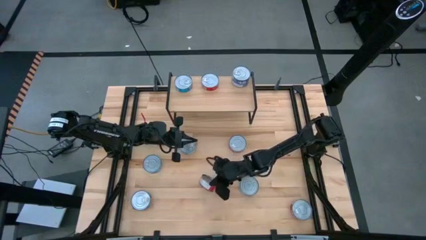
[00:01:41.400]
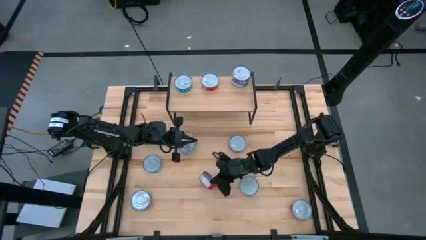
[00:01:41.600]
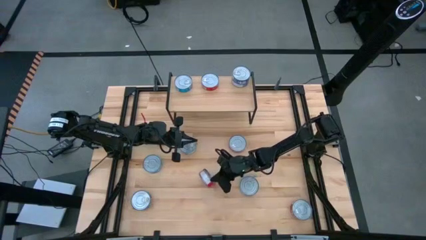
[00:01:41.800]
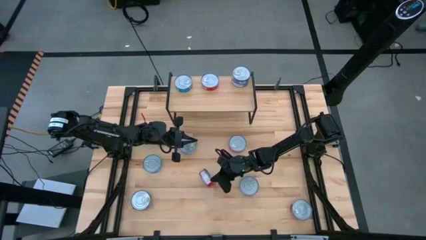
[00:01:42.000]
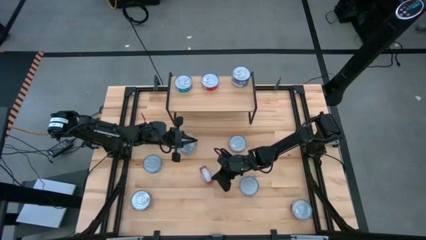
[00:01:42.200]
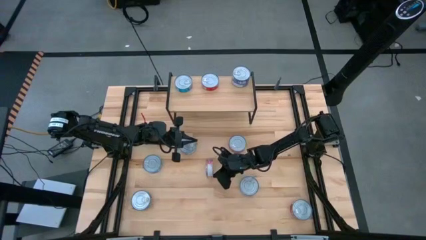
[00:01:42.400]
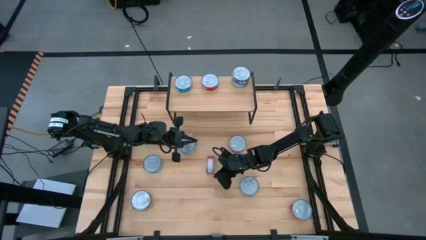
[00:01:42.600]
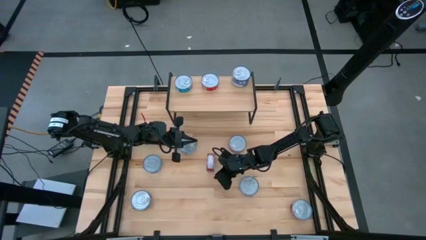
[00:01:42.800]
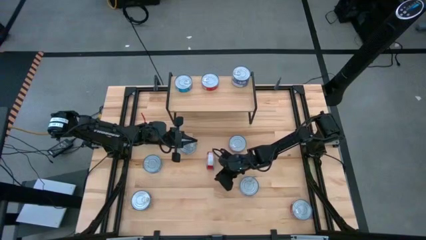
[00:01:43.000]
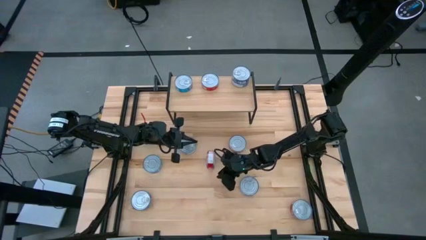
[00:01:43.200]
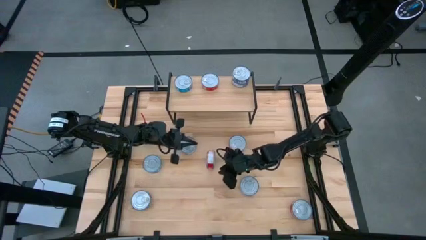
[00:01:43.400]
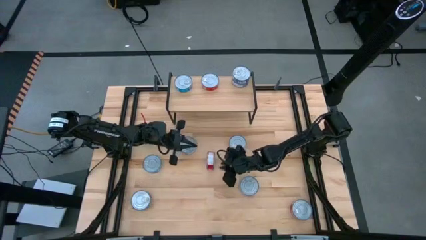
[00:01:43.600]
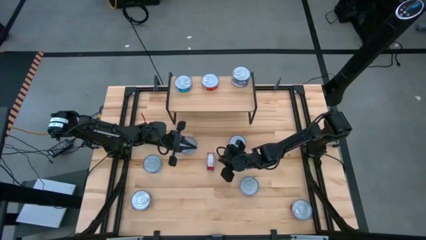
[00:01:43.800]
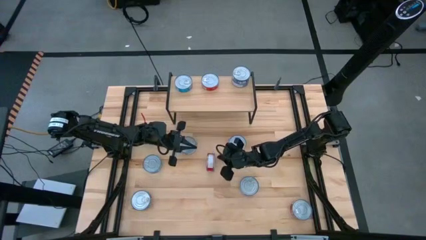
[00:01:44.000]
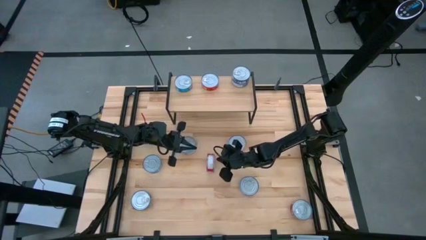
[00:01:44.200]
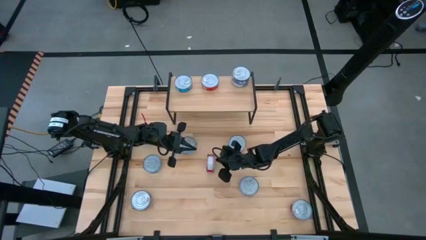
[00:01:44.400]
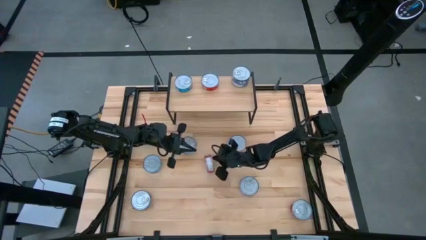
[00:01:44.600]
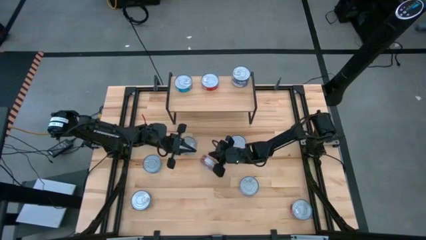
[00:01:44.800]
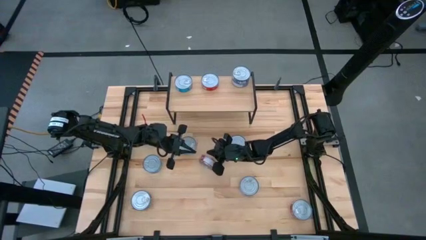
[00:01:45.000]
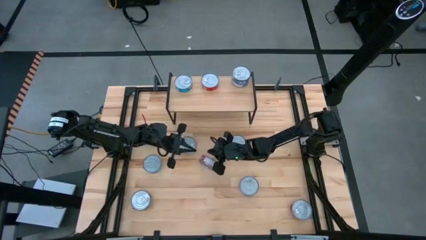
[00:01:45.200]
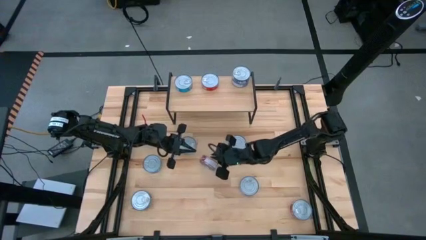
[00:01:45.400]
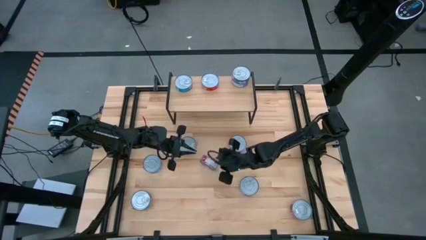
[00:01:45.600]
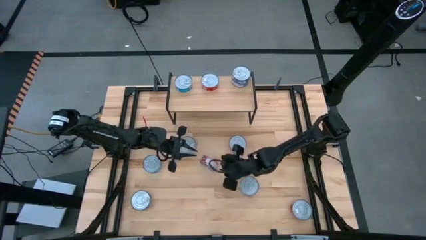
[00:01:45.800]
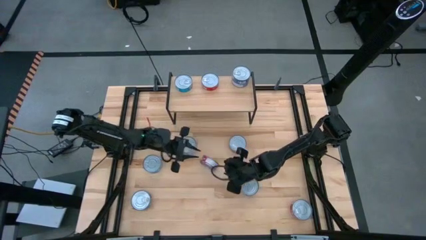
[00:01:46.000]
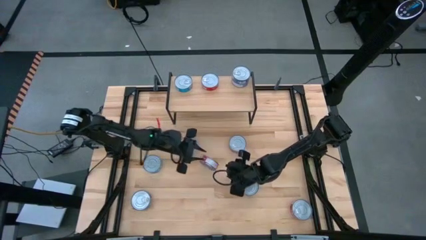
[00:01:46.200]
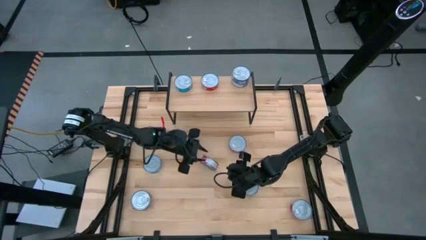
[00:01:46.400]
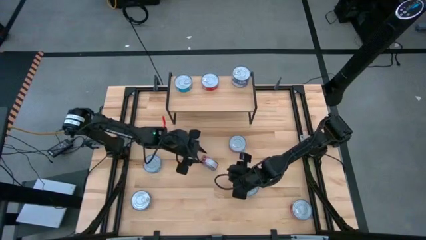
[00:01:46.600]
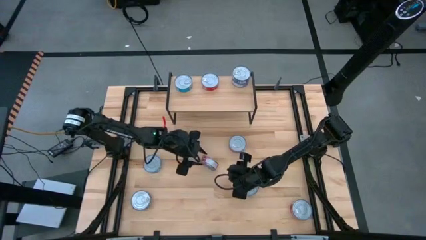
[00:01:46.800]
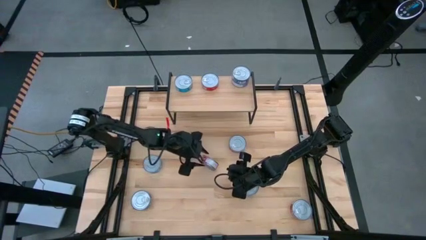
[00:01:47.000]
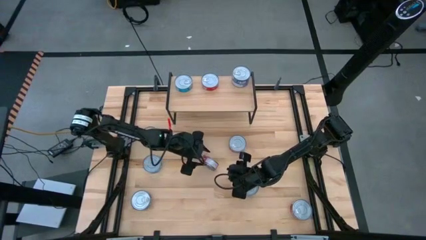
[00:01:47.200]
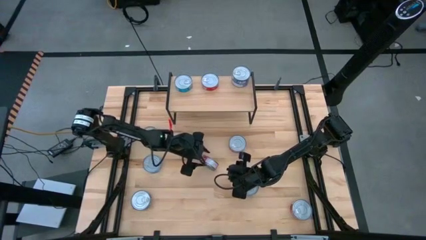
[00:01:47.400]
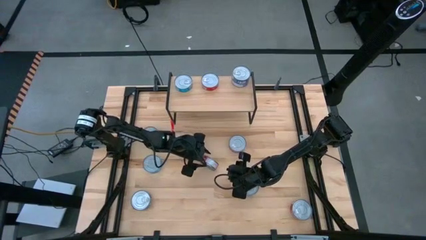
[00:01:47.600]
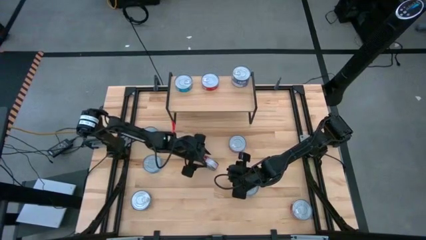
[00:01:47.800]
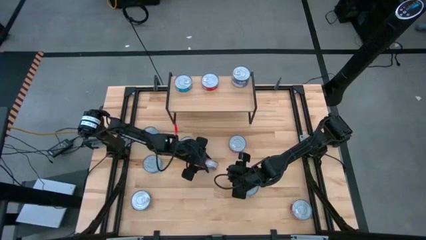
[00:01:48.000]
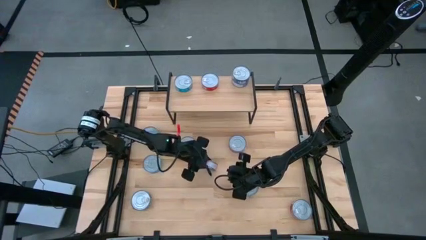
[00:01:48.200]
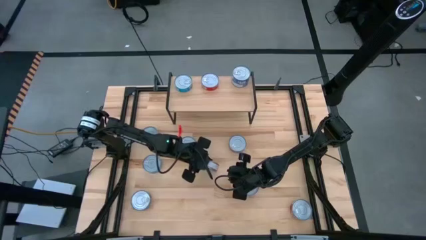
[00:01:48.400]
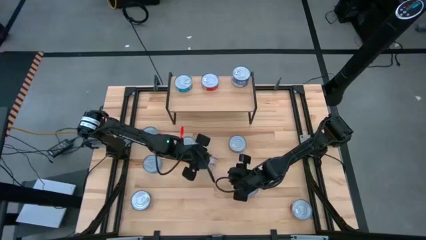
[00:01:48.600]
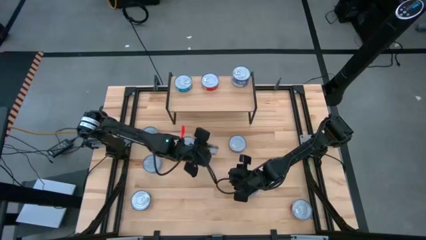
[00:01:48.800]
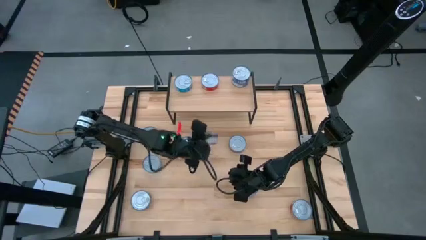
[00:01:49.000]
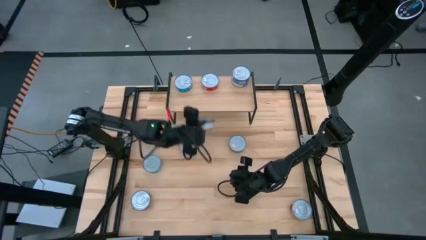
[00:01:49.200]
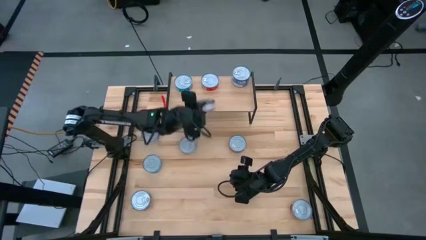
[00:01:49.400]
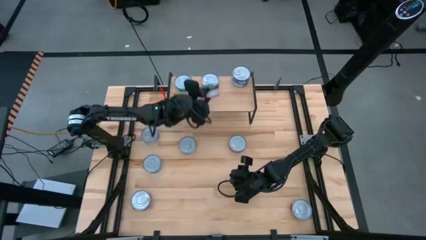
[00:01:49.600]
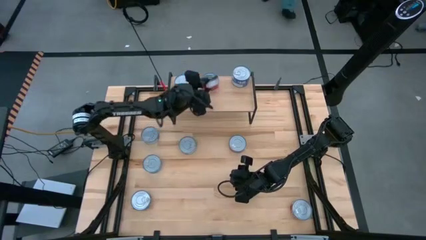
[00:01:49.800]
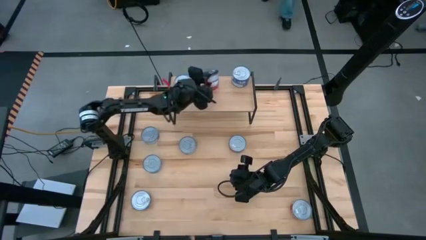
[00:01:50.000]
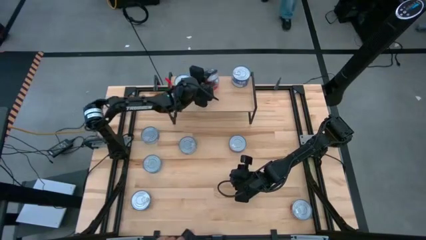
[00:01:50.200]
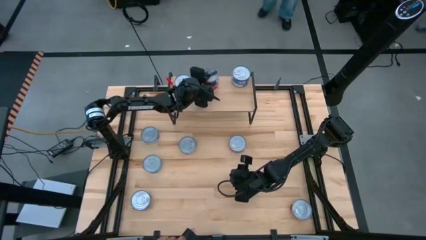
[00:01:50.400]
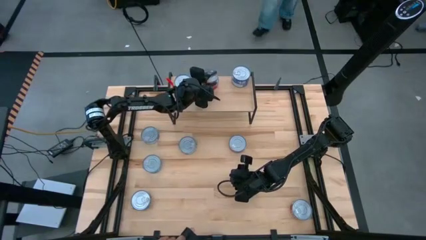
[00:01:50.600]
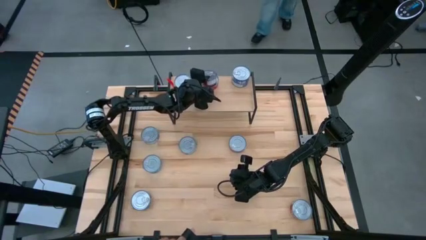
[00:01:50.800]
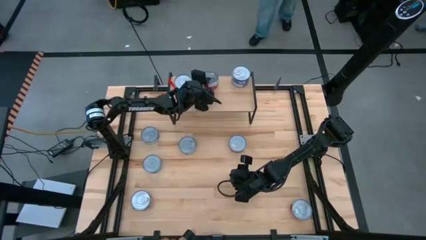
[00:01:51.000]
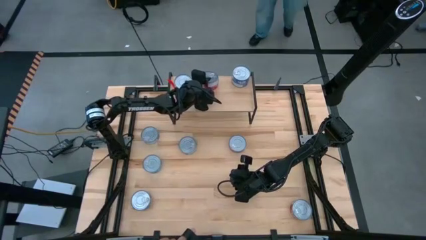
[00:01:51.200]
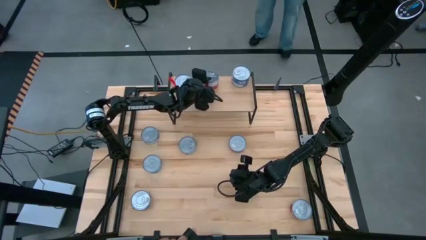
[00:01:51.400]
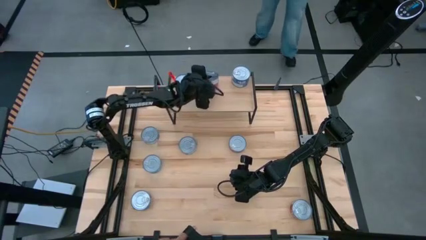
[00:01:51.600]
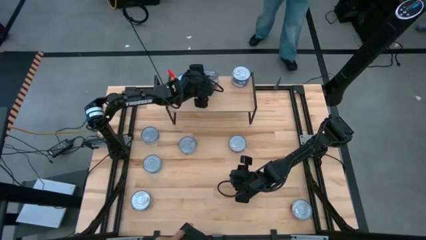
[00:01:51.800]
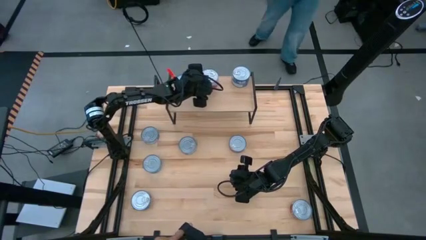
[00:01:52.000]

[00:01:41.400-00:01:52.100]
Task: Stack canned seafood by type on shelf
Stack the red tuna can on top of the other red tuna can on the shelf

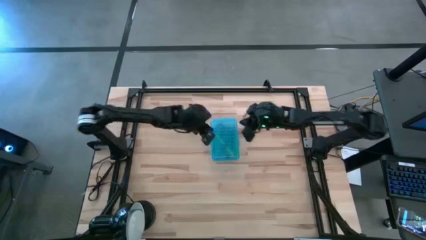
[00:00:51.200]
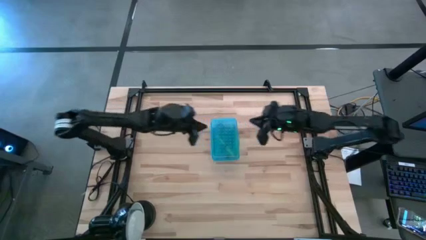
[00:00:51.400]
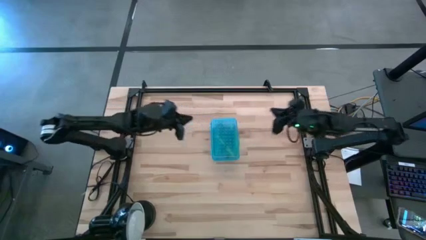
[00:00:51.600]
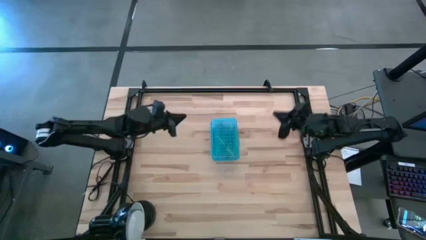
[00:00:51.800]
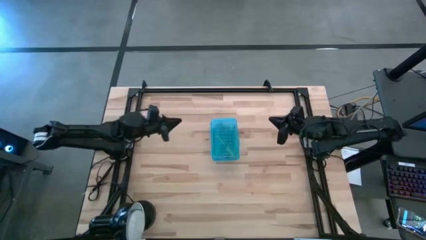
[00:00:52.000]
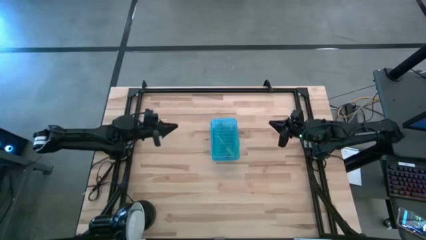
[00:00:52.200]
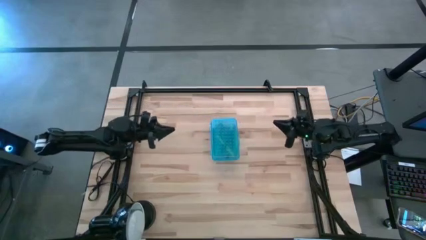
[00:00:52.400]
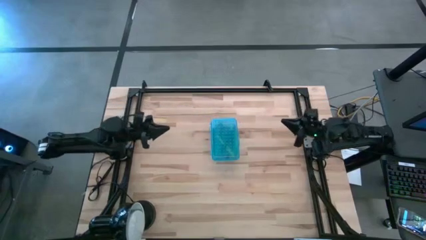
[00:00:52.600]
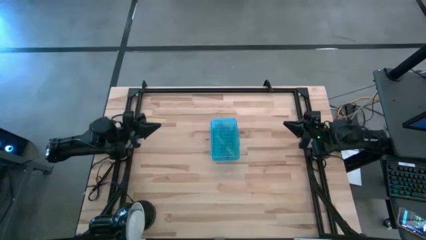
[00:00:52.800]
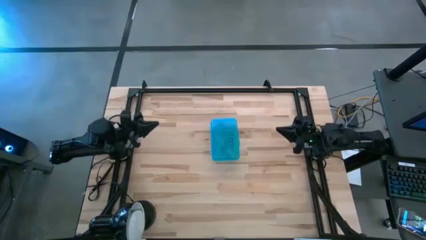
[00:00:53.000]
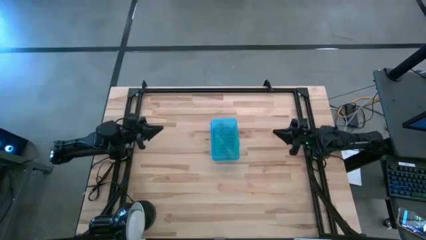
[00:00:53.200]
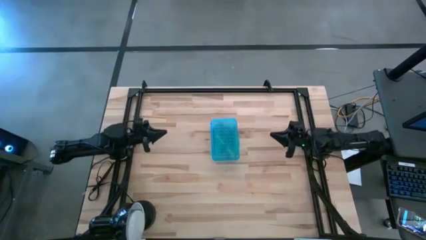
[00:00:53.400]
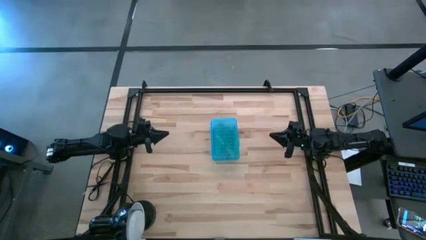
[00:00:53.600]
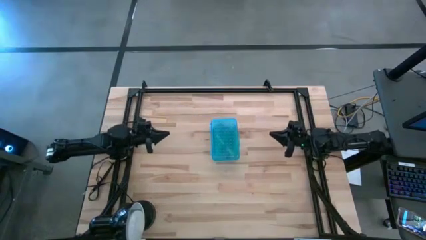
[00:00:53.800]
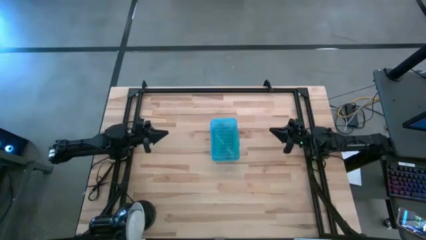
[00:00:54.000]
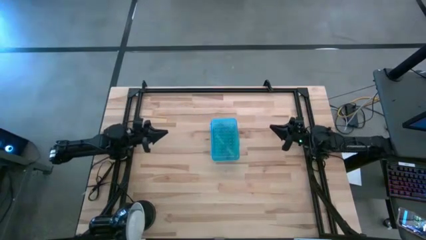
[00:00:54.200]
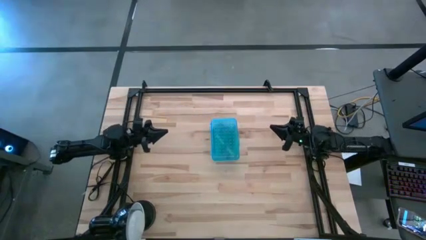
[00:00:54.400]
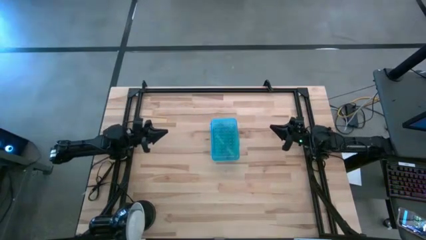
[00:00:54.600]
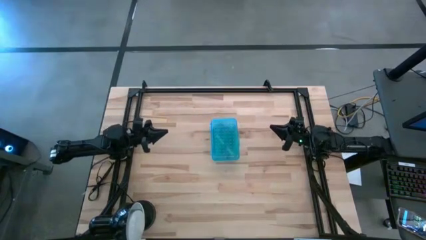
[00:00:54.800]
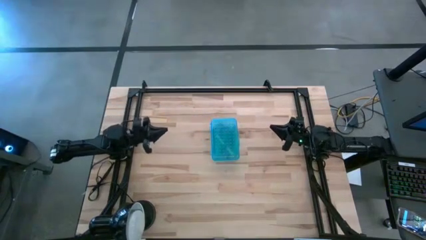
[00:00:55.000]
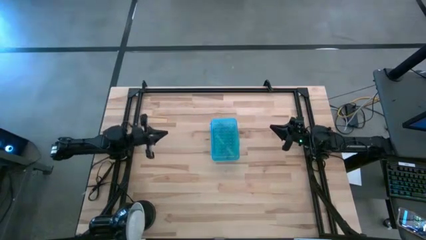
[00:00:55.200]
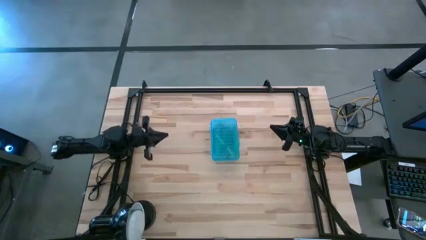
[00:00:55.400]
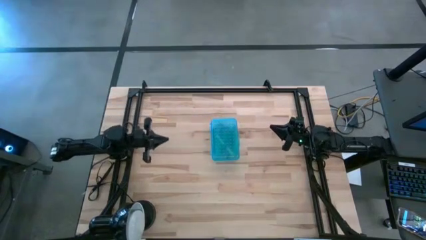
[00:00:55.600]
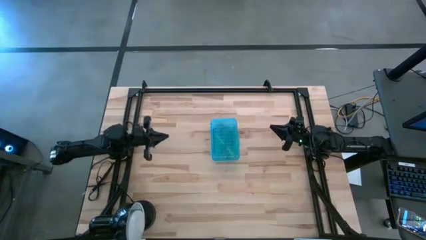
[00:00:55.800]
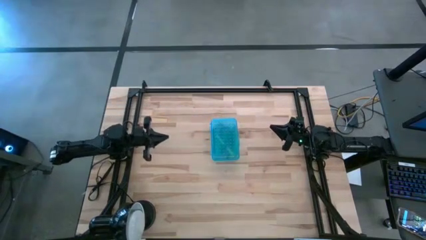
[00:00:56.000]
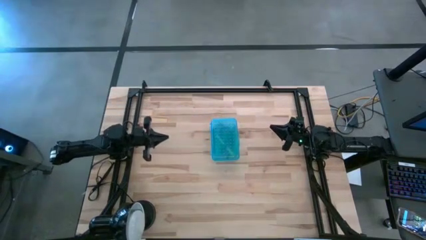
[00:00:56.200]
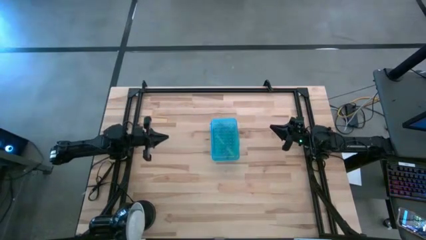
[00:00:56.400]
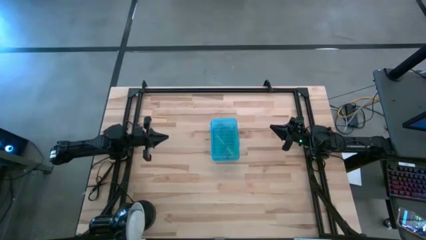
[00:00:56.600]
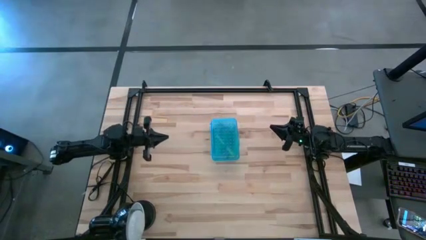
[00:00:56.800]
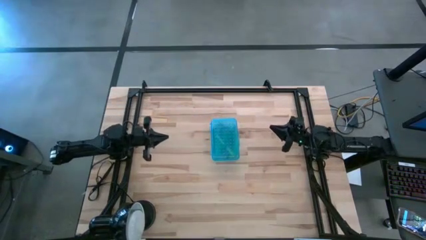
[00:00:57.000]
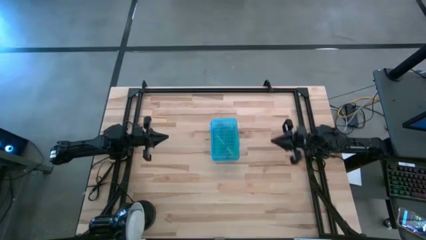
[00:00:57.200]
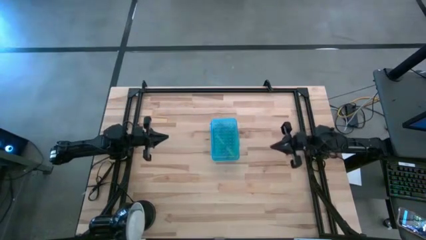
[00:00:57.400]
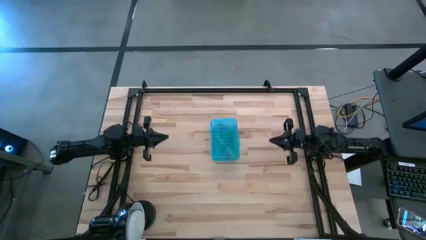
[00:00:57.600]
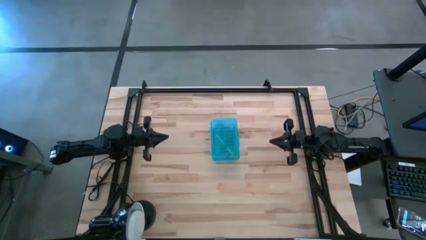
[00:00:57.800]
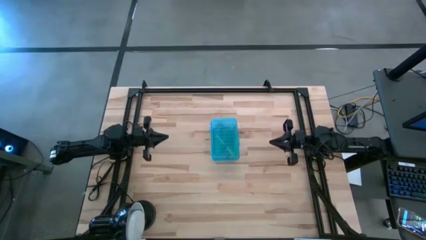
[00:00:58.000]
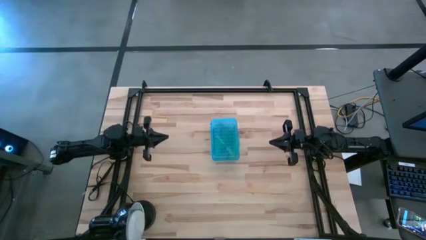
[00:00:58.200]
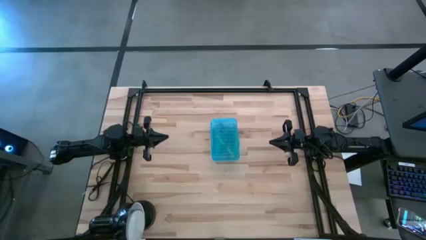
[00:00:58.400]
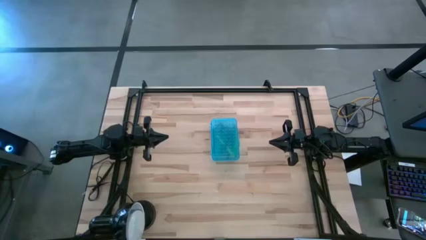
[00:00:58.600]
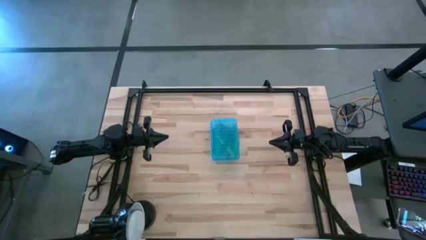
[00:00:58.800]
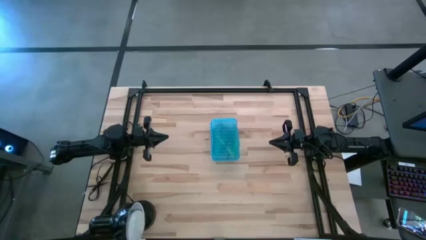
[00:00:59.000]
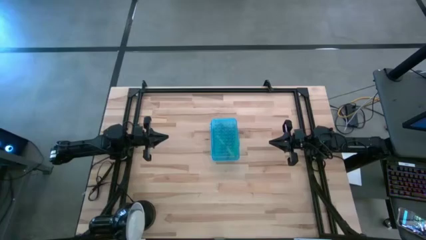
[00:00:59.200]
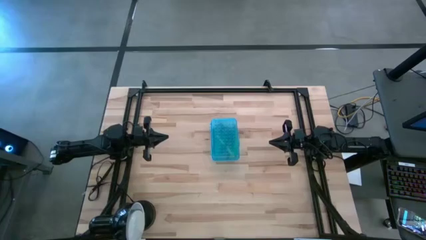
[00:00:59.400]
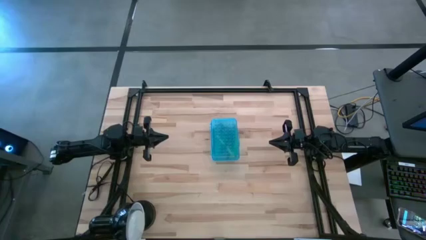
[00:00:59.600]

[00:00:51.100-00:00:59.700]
Task: Pick & place school supplies into a supply box
Return to Home Position
